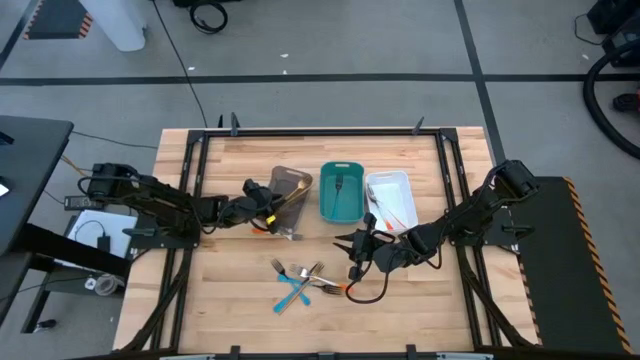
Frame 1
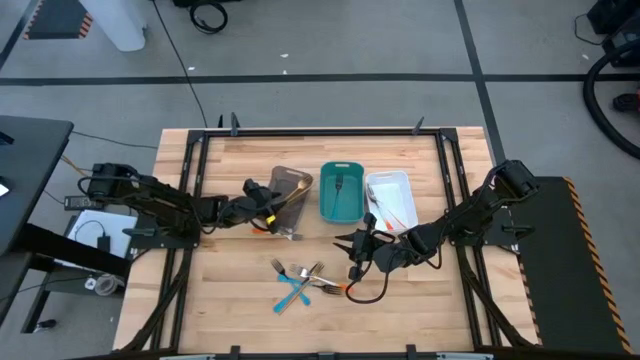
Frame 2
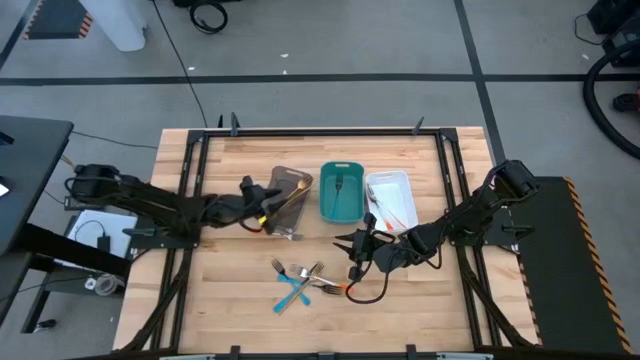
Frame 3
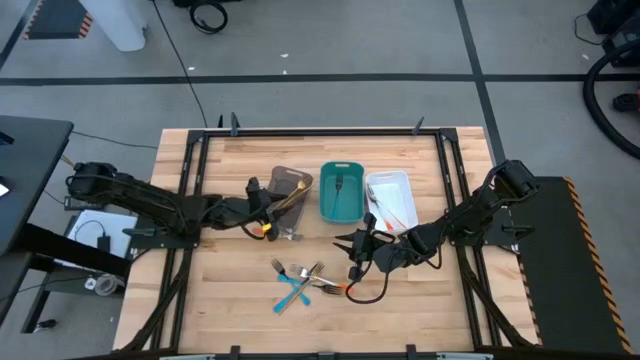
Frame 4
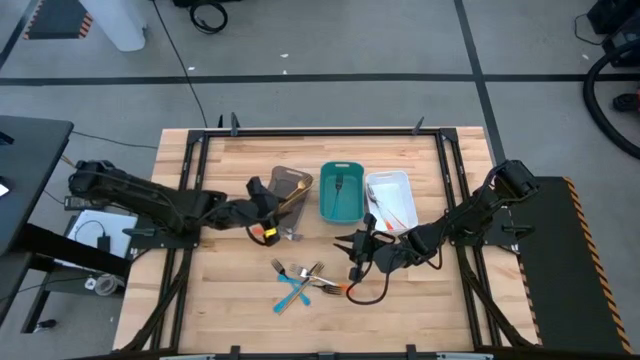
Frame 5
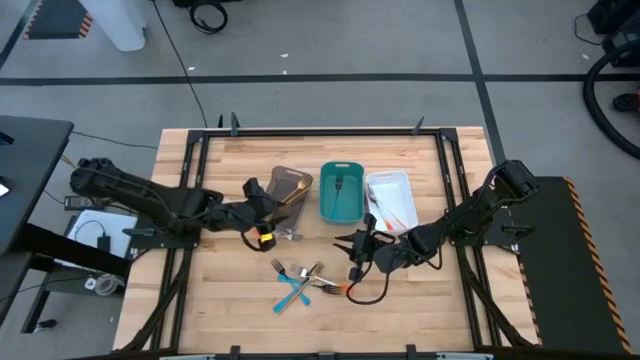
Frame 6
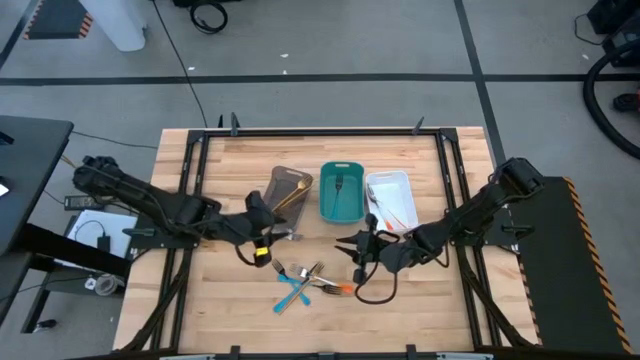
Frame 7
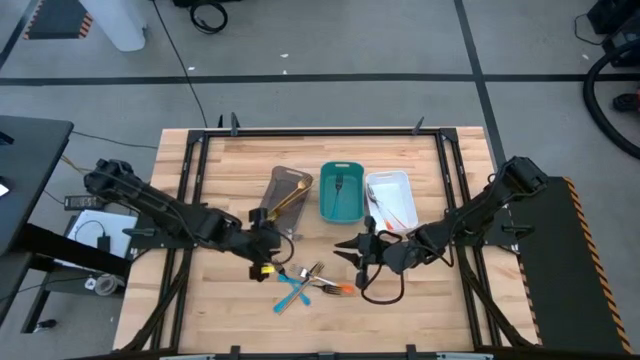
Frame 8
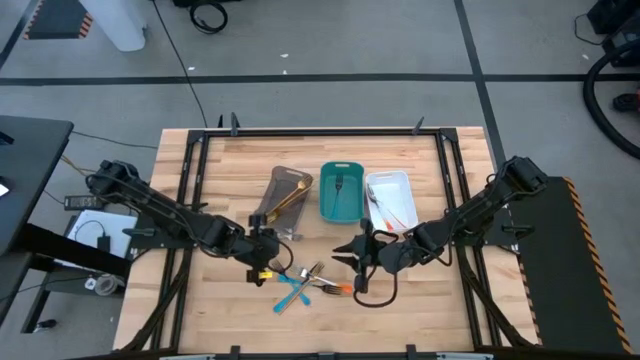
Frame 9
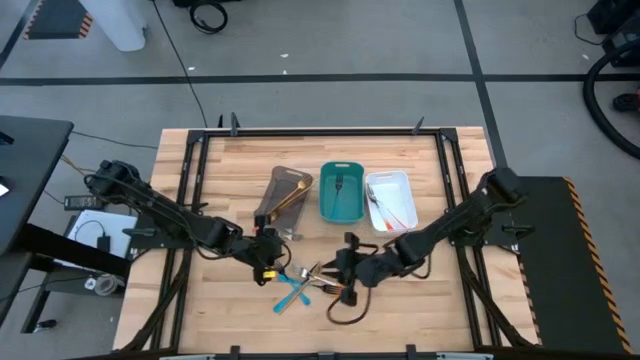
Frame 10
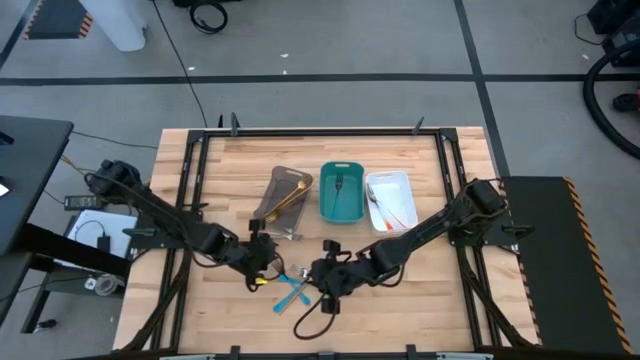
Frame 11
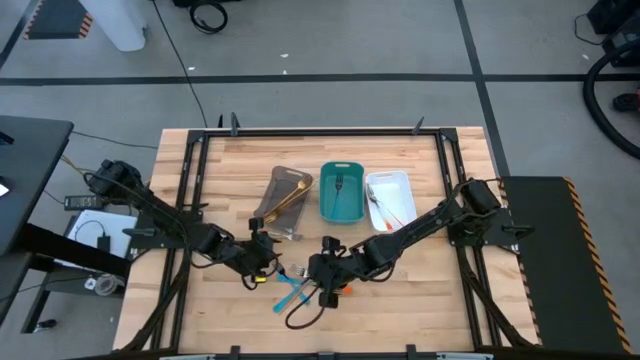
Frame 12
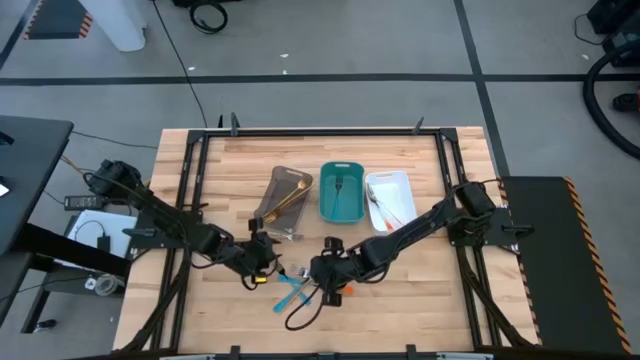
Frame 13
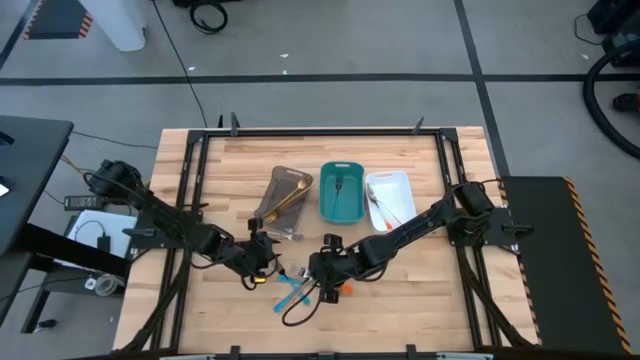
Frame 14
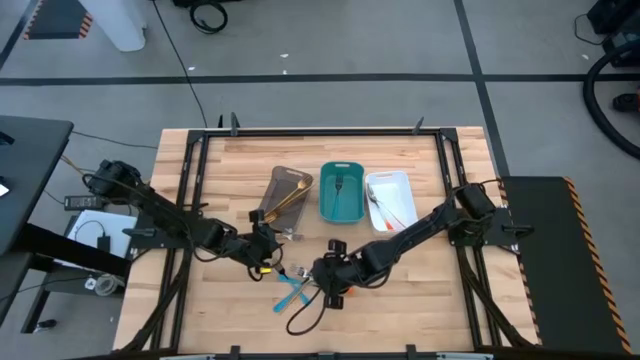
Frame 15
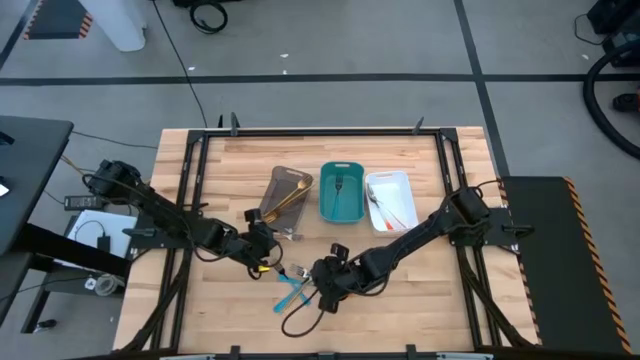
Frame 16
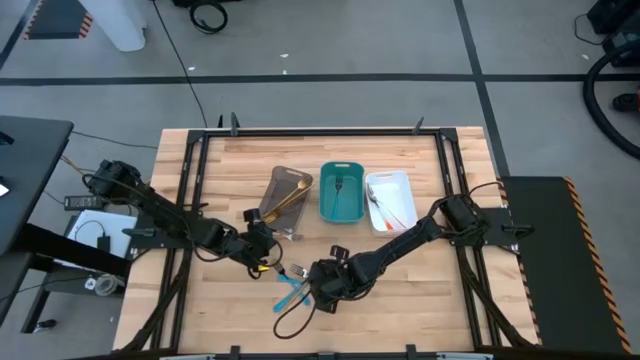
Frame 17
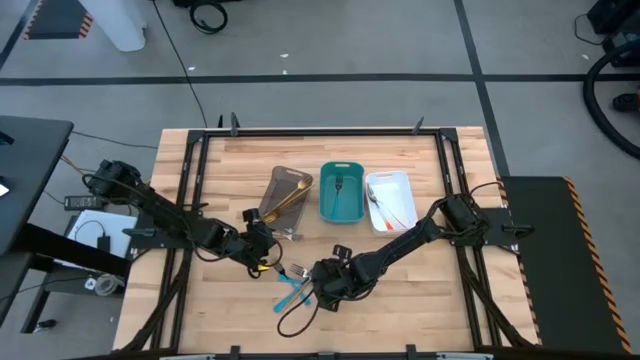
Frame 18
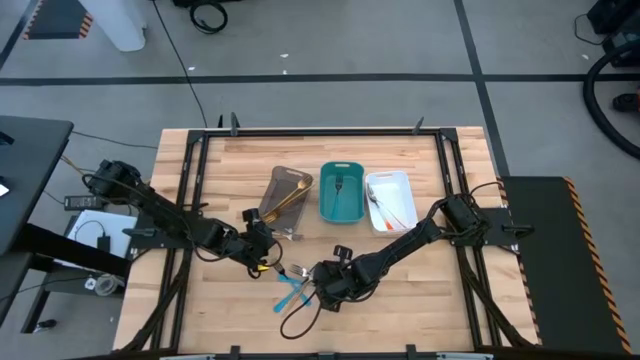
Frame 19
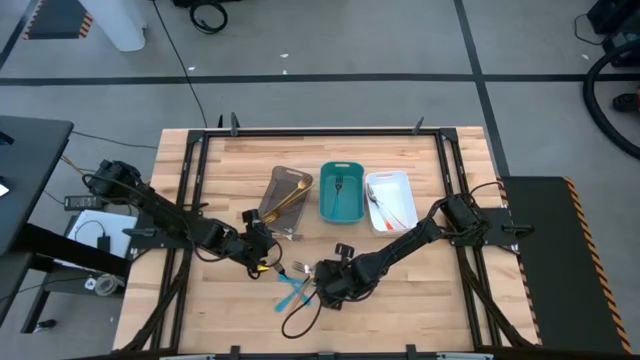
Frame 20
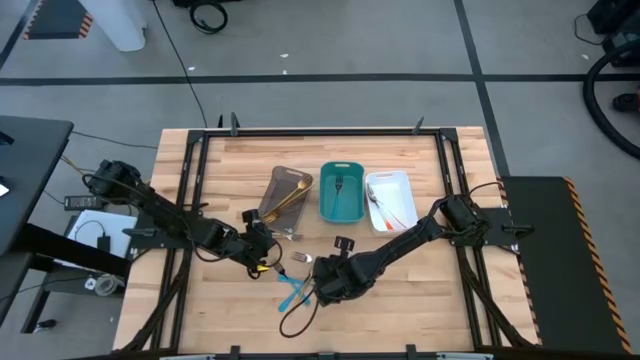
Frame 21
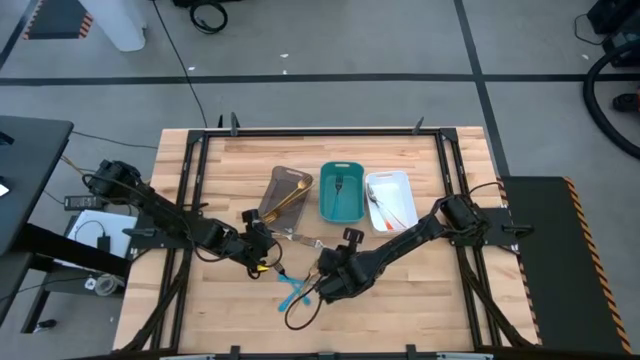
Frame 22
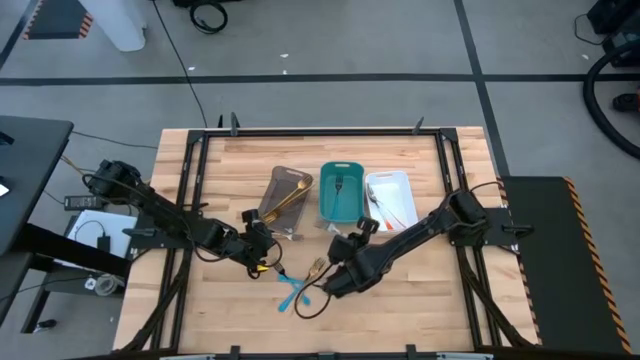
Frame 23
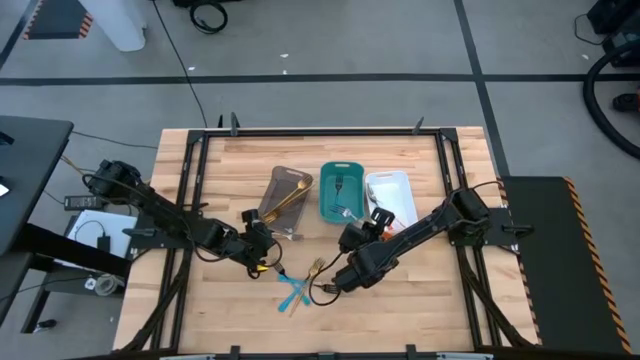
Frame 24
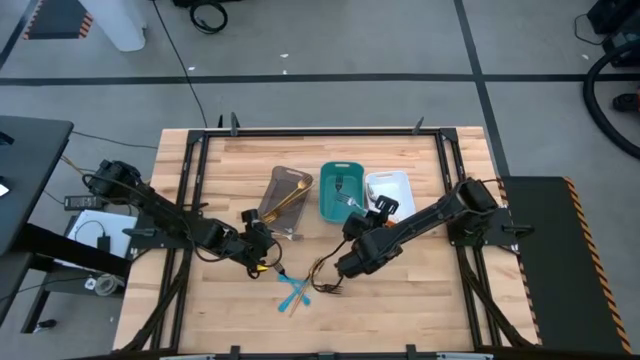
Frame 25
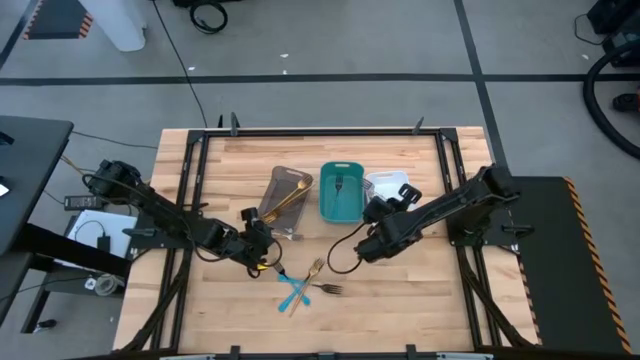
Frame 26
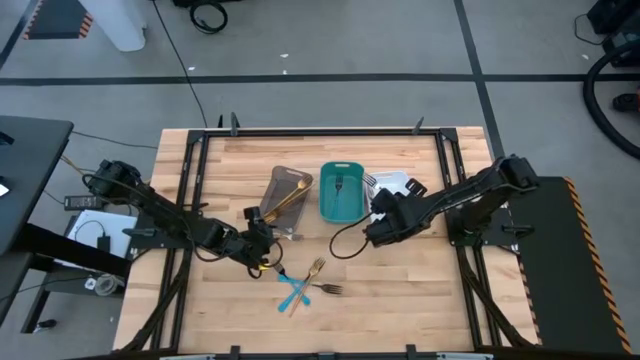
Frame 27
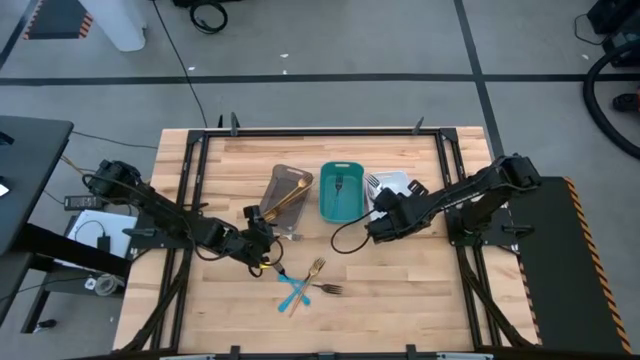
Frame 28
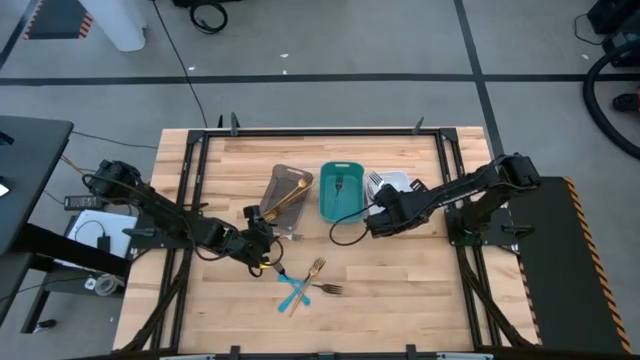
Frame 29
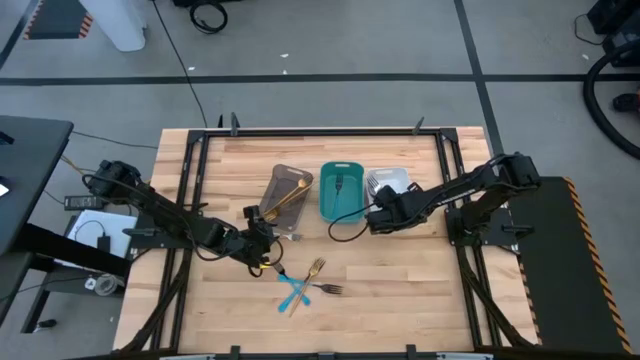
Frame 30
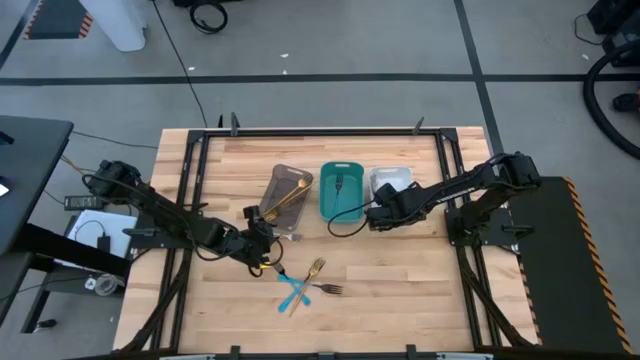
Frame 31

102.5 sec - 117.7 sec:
Task: Sort silverware by color (type)
Put the orange fork into the white bin

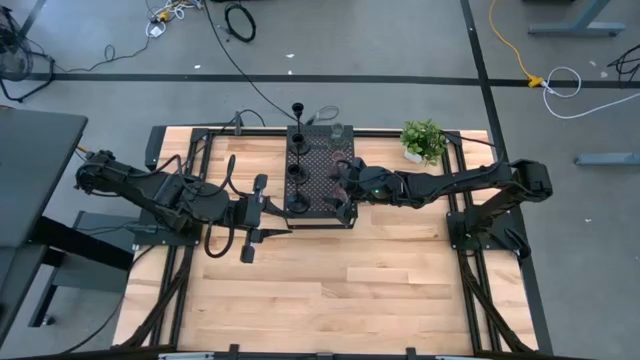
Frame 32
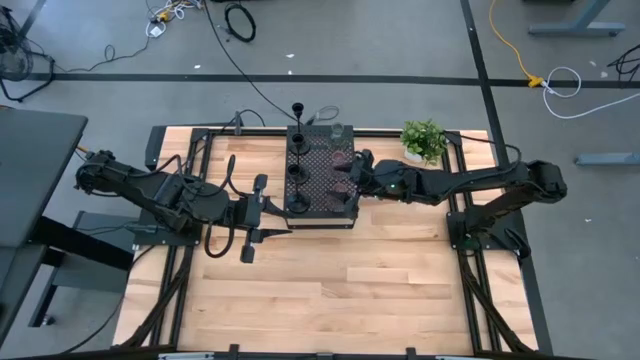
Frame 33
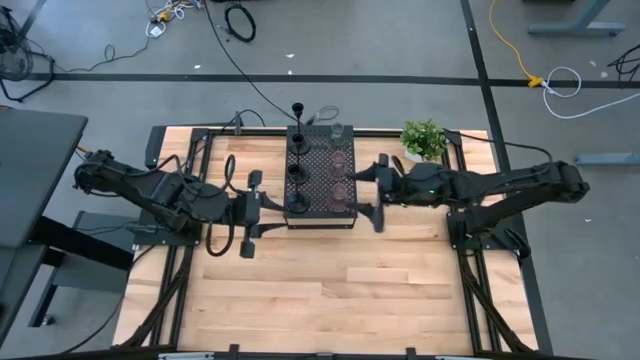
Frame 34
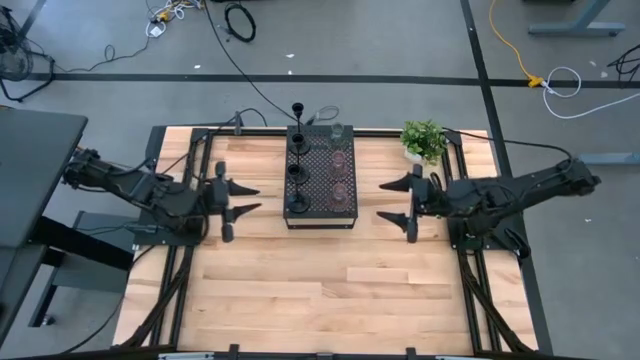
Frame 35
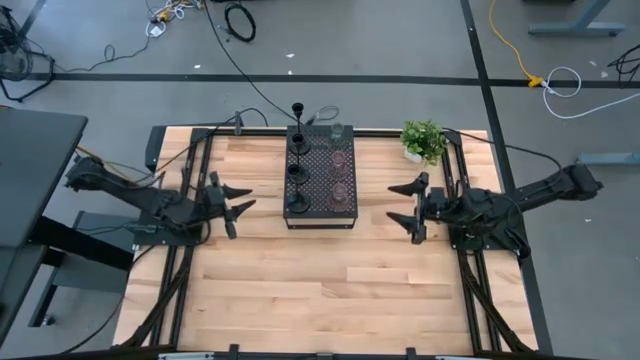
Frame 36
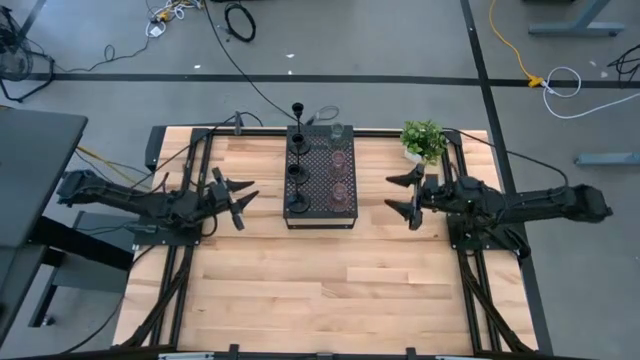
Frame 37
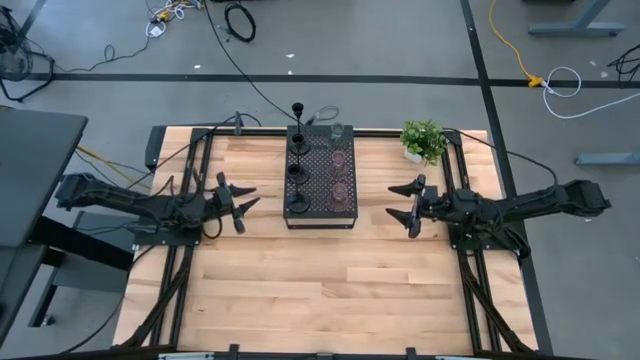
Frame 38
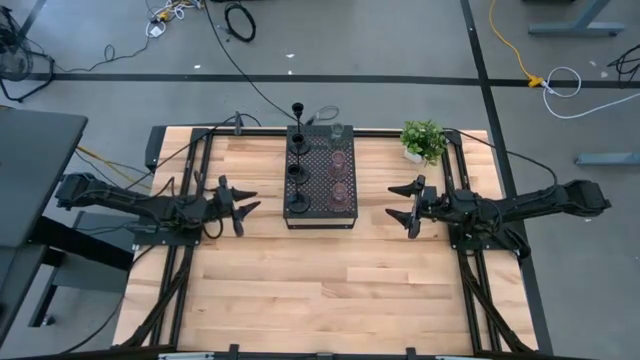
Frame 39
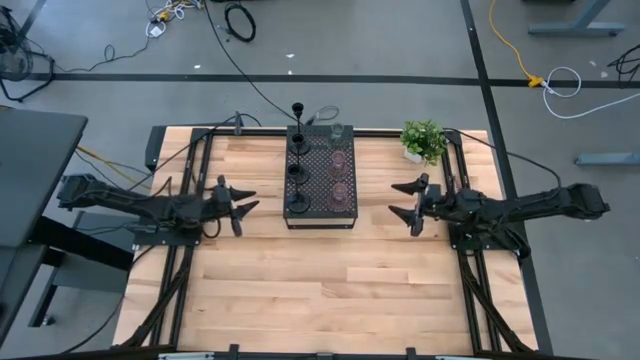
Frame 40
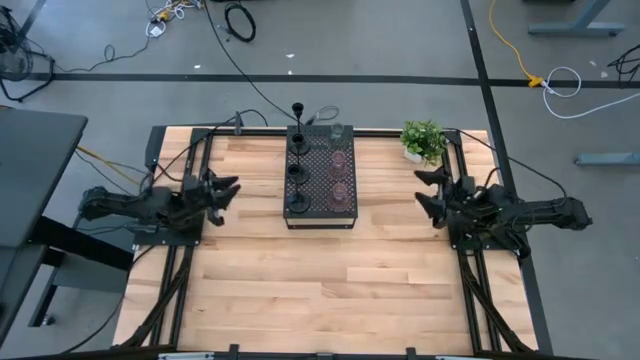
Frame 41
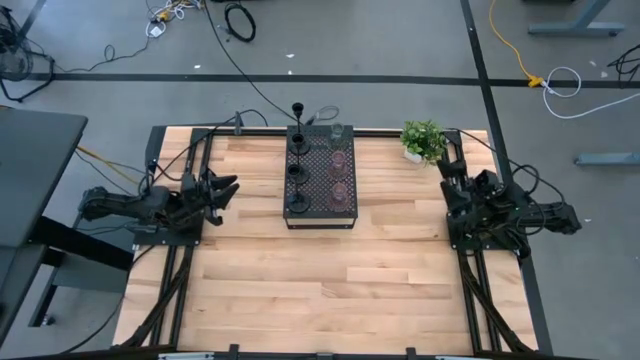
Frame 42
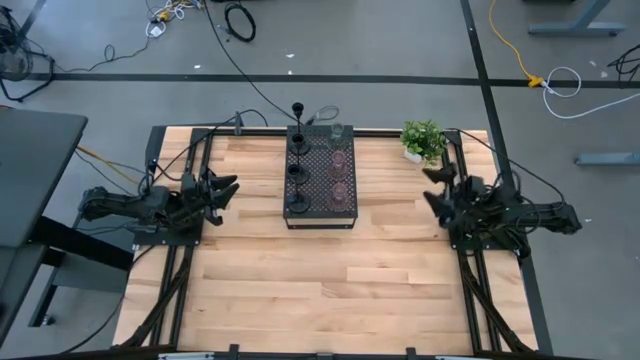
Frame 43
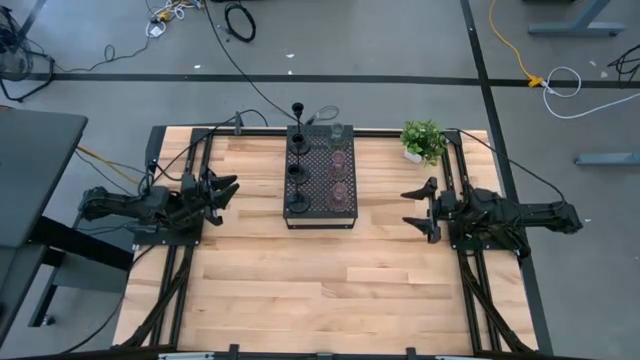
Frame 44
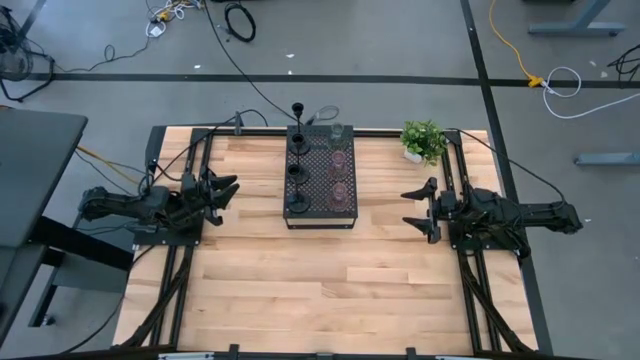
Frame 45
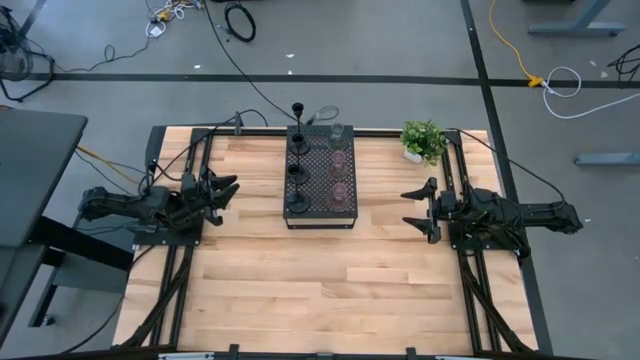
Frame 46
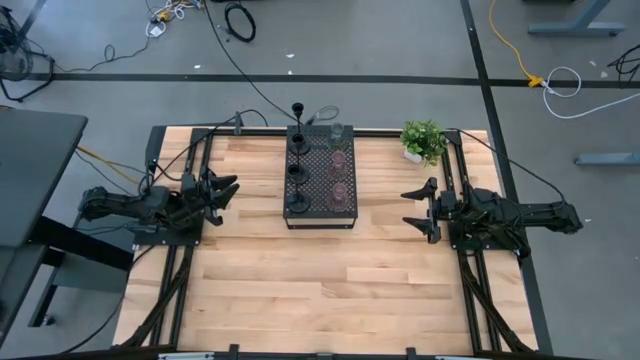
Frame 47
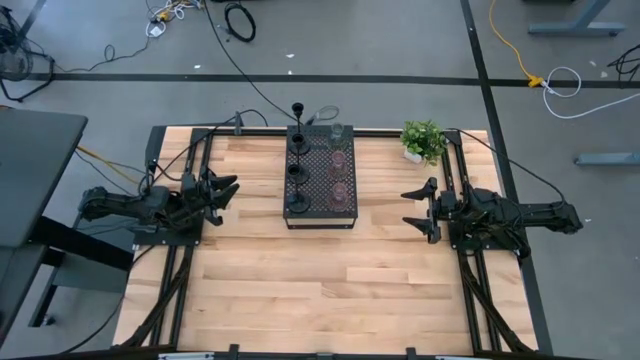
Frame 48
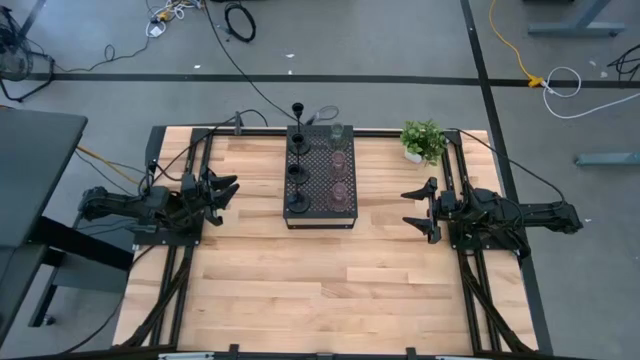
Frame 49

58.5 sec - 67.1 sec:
Task: Pick & Place candle stick holders
Return to Home Position
